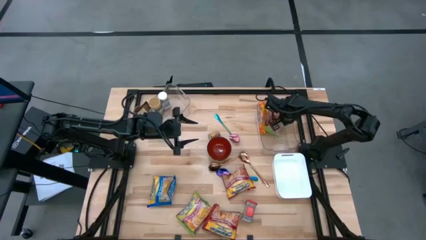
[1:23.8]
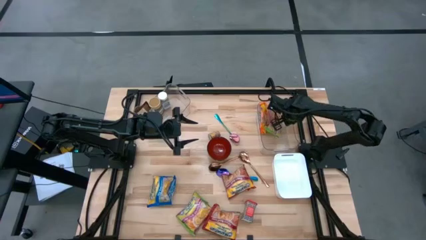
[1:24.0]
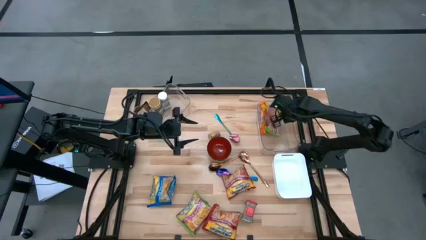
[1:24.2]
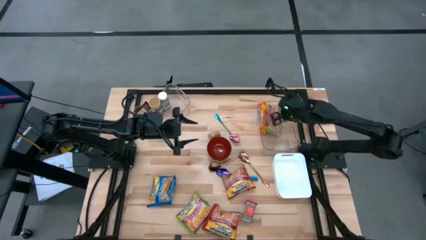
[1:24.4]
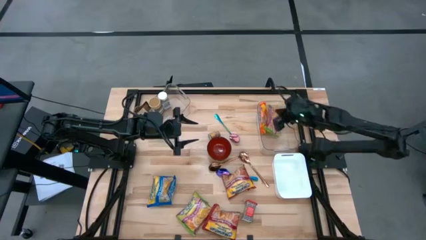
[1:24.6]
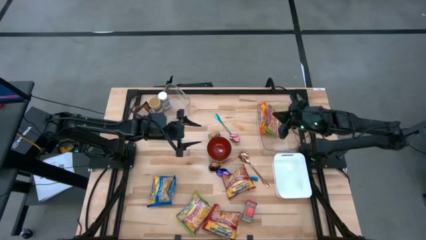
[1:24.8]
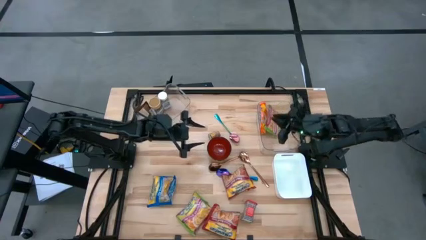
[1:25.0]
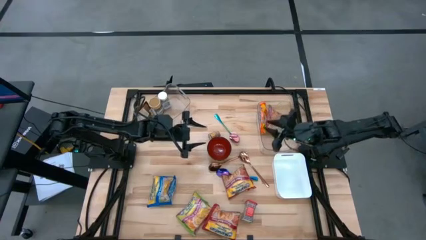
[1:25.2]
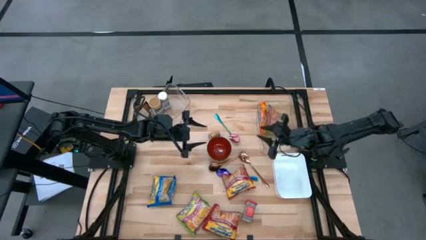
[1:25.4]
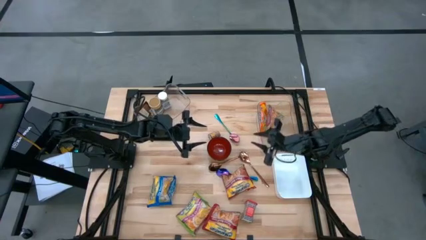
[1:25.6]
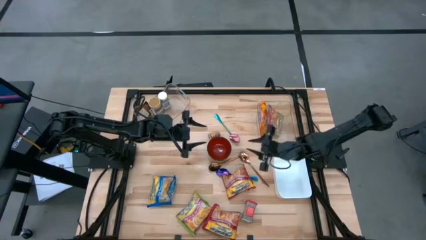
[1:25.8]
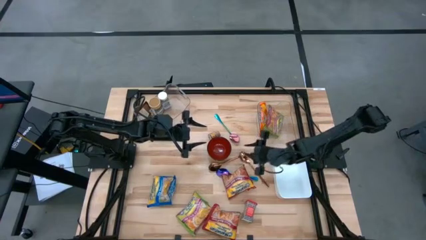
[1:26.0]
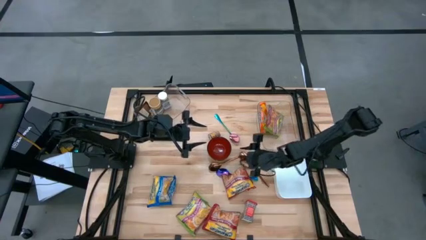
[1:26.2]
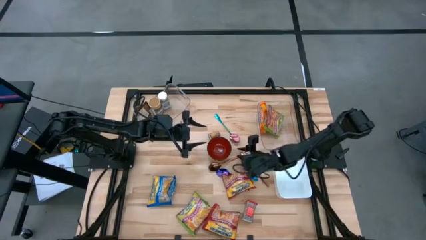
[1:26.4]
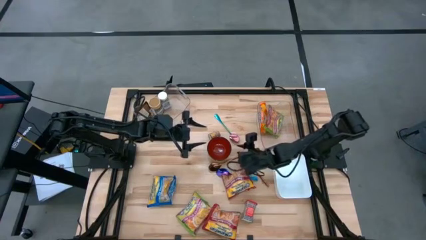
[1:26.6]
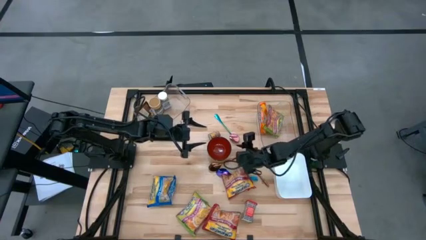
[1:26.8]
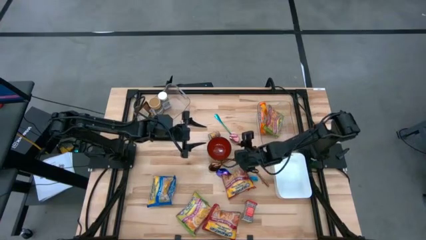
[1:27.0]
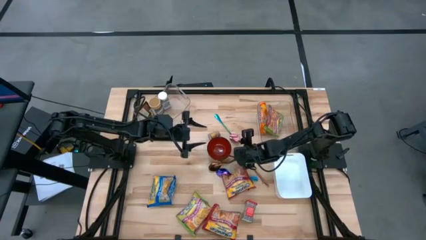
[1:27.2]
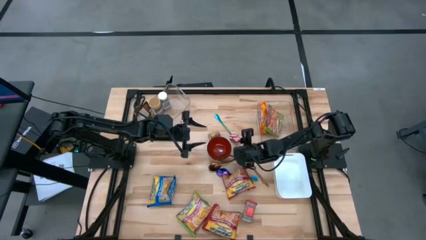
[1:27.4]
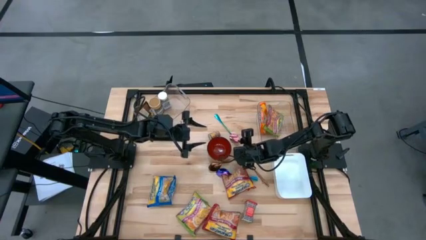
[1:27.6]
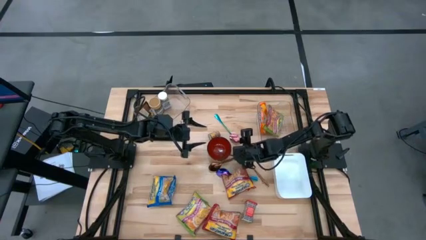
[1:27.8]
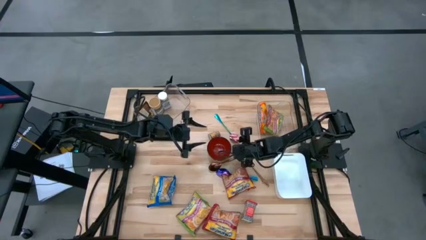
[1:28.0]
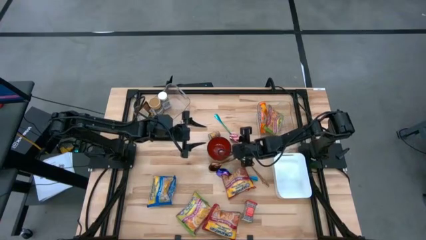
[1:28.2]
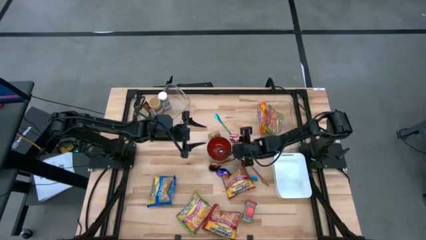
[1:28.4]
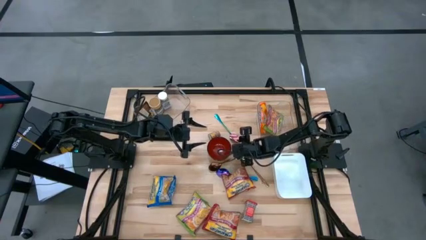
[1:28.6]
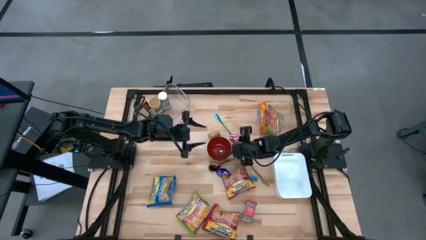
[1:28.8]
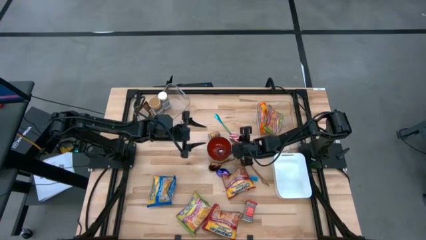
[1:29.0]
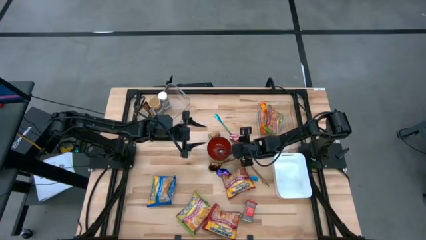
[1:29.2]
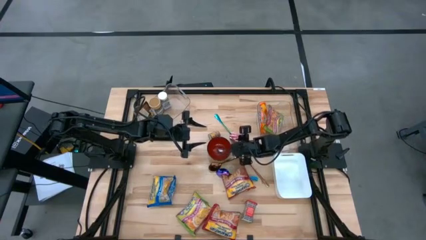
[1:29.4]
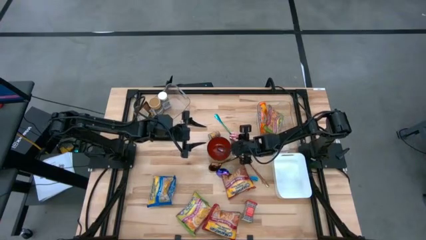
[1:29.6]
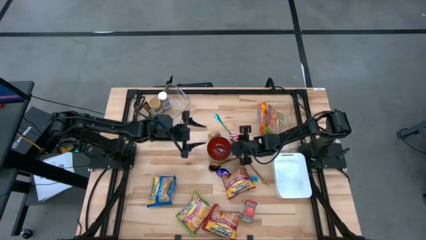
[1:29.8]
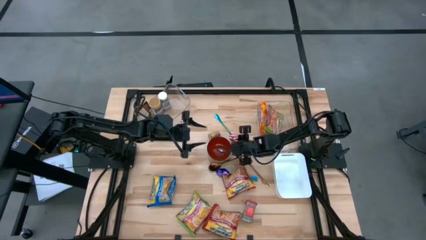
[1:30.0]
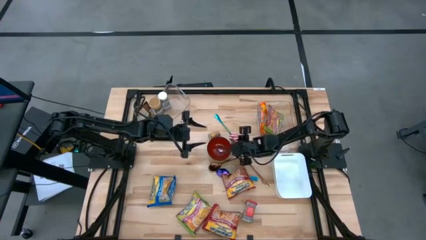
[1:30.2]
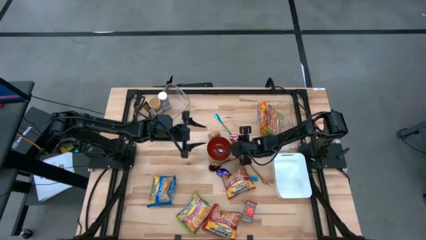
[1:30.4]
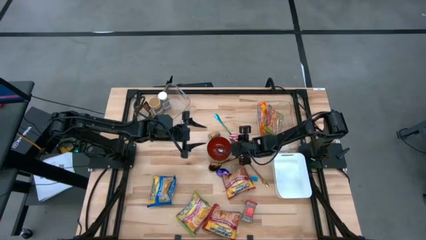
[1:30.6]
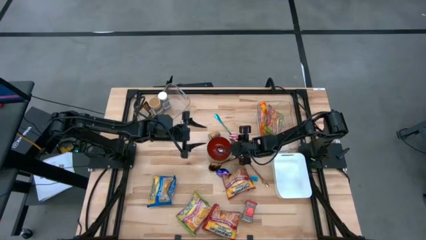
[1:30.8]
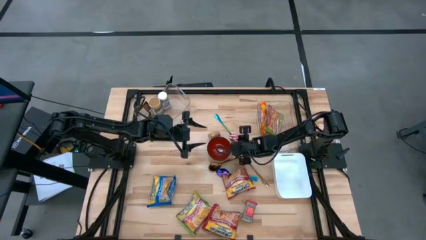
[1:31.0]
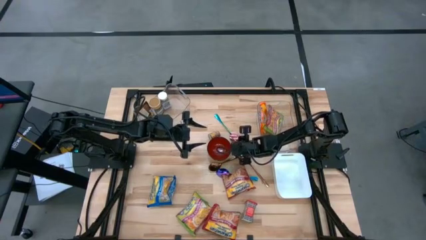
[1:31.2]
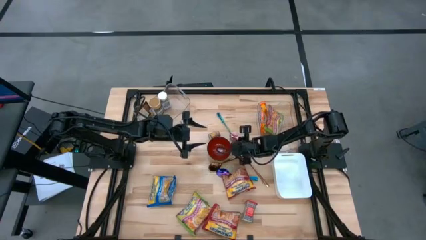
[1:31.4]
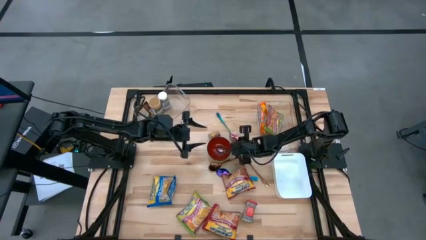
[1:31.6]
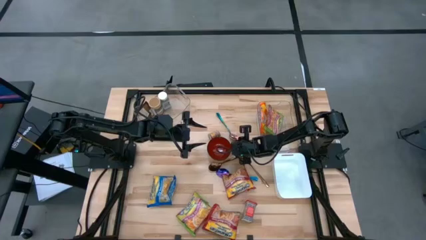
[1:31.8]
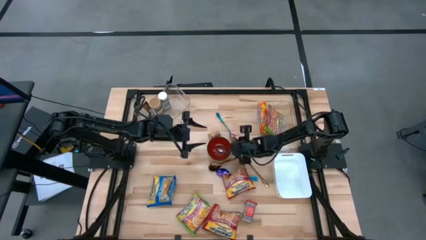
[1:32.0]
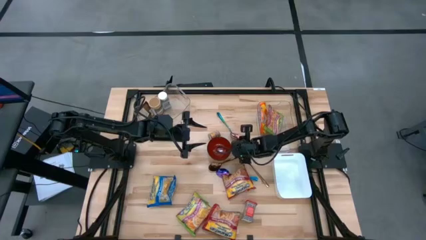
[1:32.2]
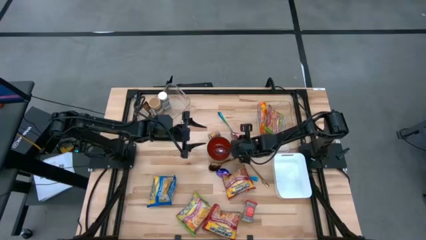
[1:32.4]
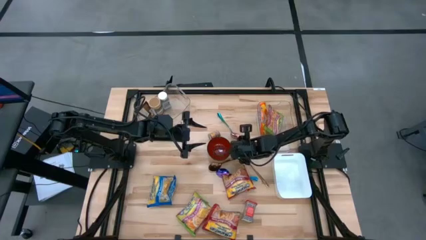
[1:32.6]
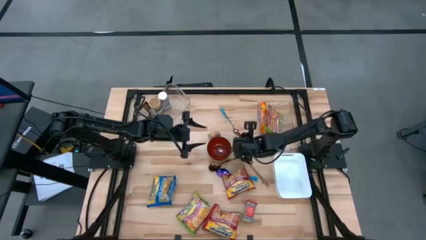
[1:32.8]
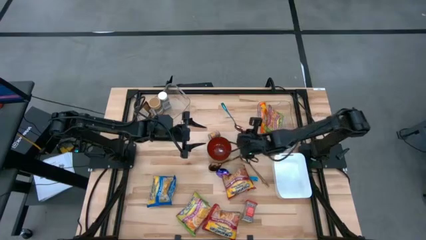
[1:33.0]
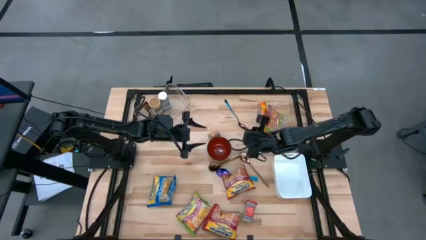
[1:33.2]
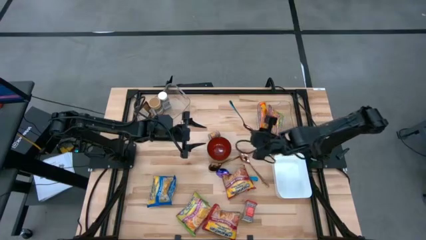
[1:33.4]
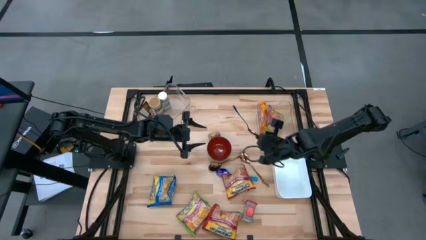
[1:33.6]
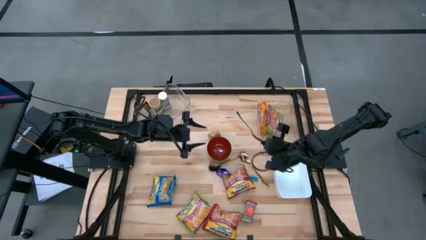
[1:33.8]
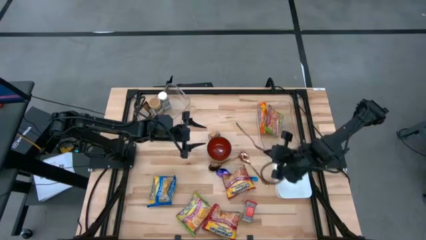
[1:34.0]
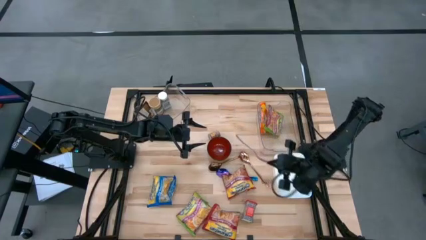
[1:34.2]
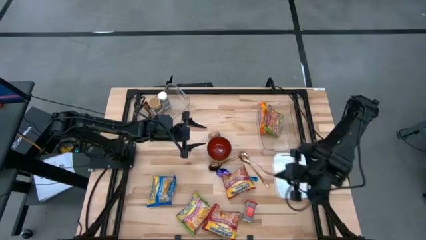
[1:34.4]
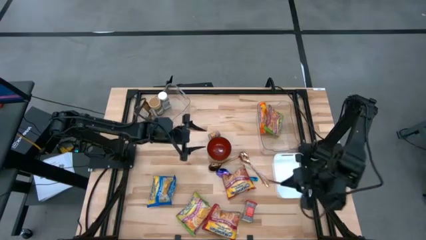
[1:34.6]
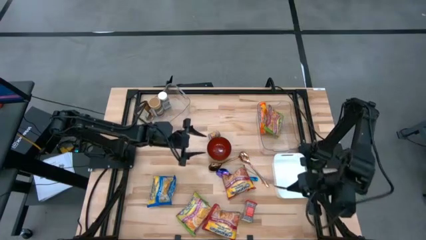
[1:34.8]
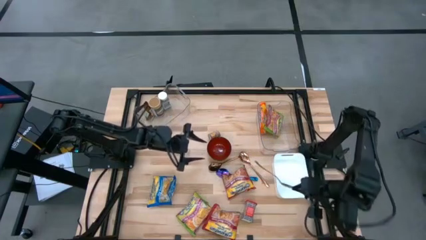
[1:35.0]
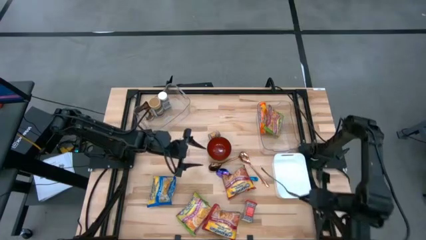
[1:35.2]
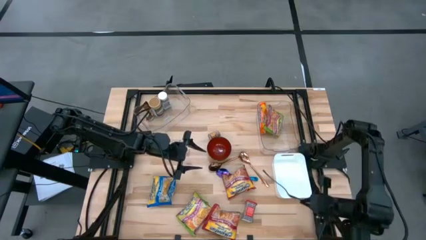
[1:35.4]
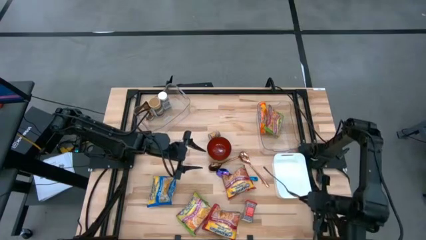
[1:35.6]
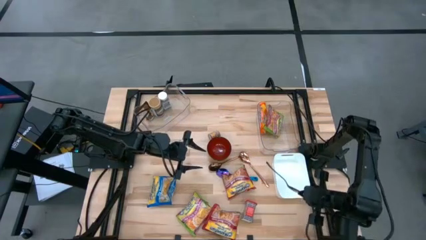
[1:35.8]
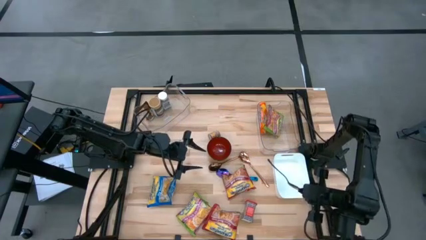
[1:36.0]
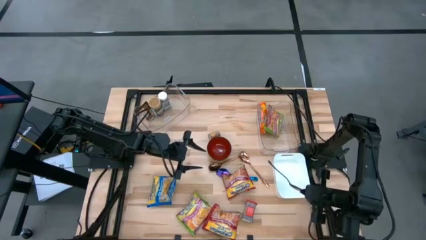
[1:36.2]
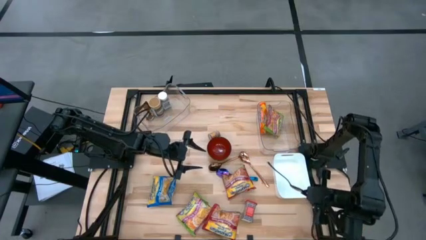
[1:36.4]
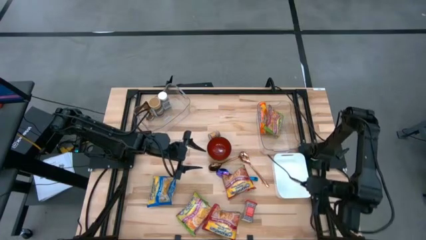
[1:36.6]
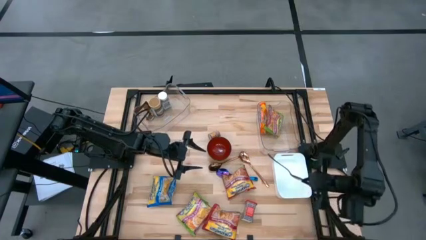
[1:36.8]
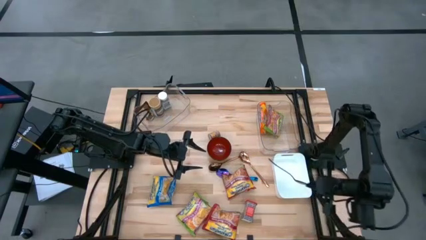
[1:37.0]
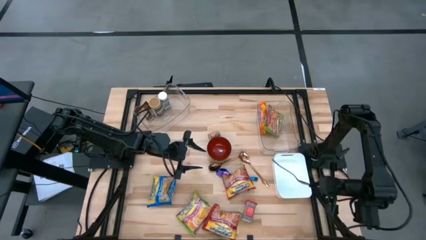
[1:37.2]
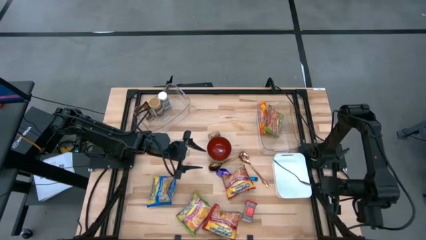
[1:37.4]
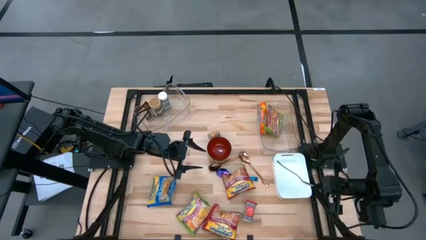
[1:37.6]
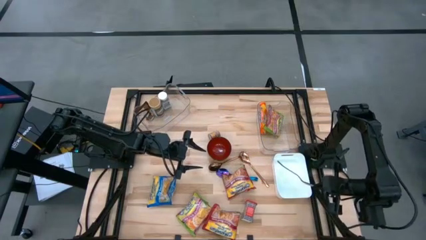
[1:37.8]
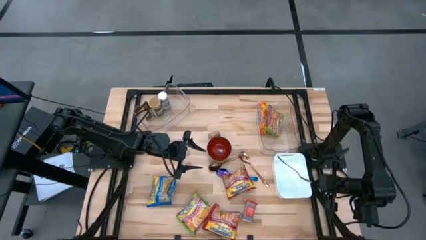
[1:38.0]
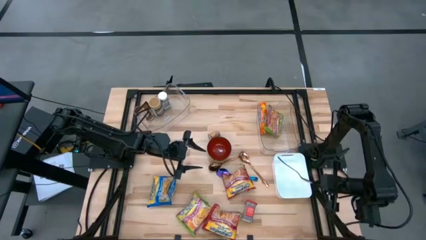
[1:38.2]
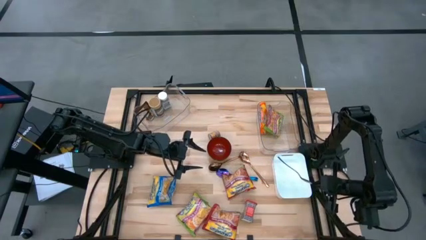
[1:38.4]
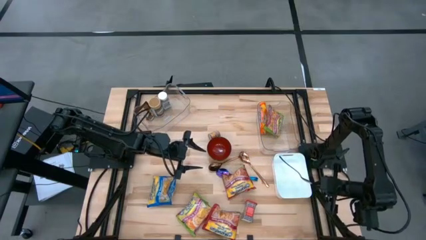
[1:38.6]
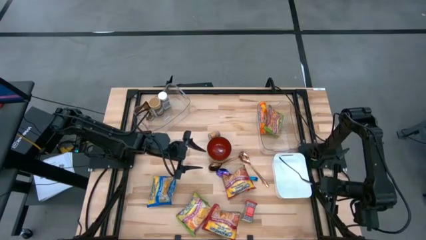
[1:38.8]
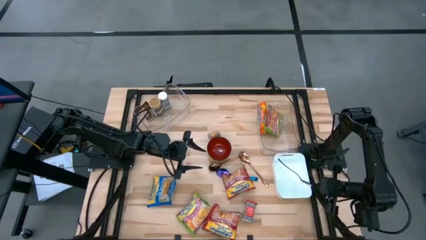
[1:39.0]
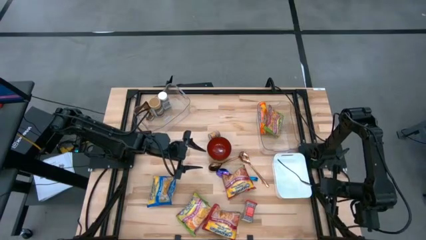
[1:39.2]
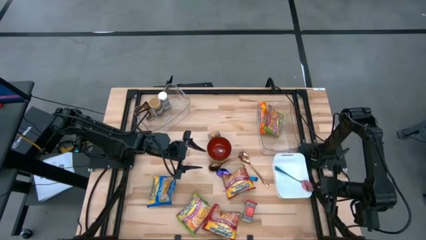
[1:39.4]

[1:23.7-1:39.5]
Task: Pick & Place Food Item
Put the top blue spoon into the white bin

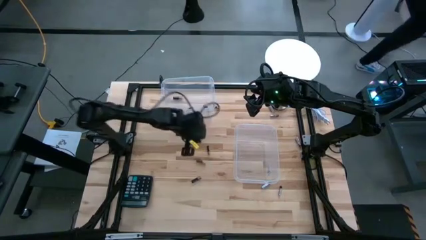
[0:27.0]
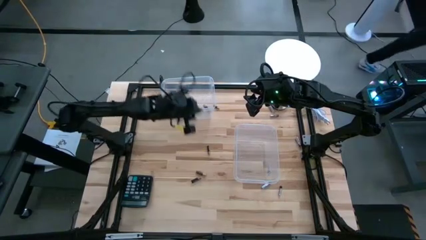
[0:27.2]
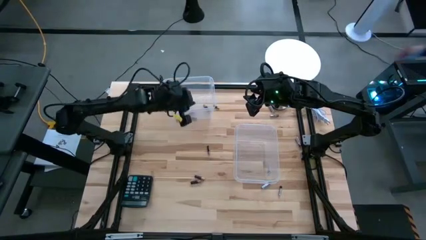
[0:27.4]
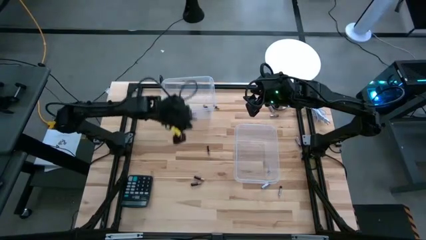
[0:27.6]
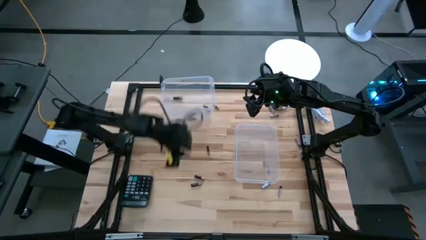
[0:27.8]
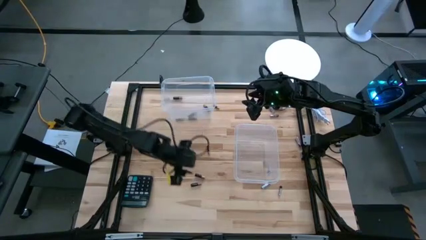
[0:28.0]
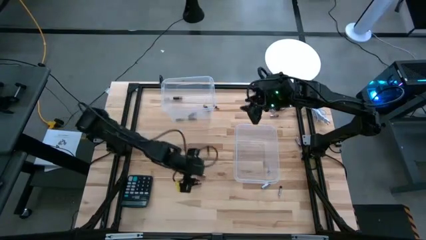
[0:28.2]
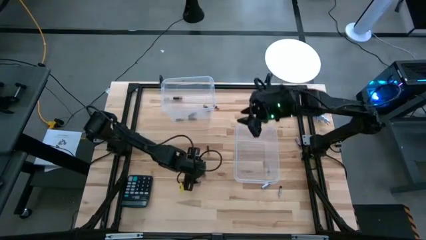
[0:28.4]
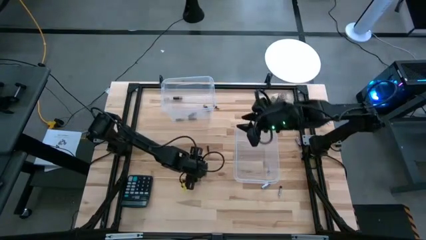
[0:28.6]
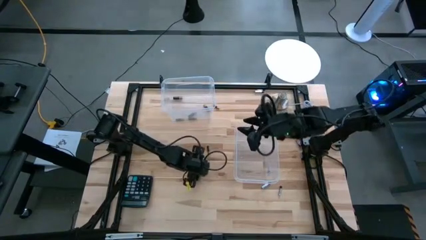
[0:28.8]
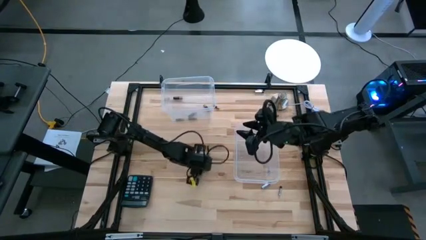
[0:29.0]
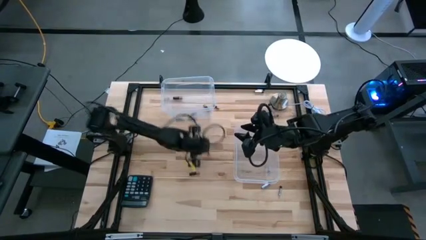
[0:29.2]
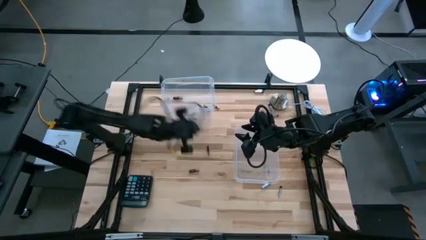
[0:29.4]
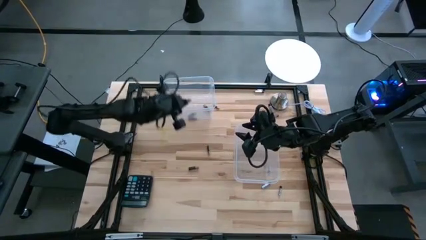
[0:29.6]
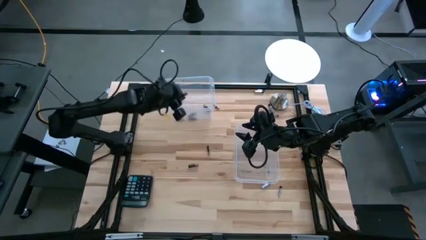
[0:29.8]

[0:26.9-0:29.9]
Task: Sort batteries
Put the black battery into the left transparent bin
